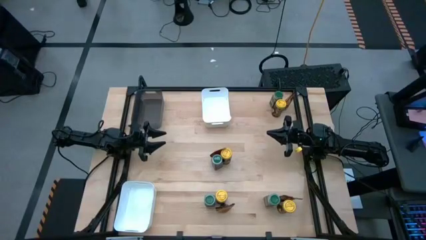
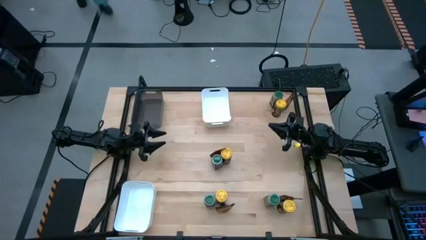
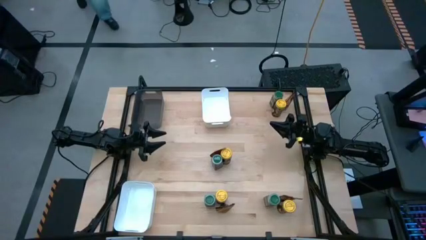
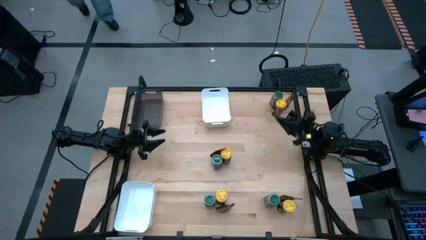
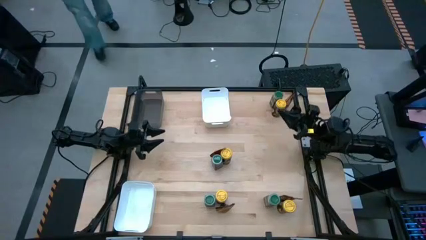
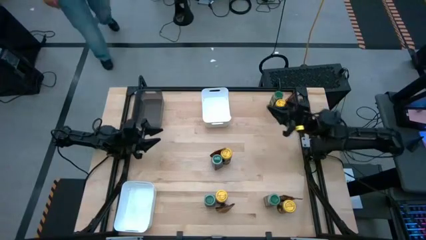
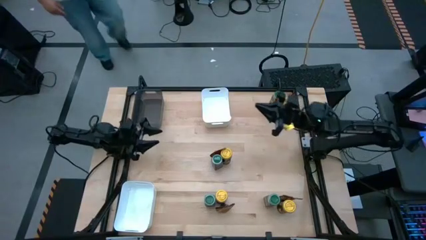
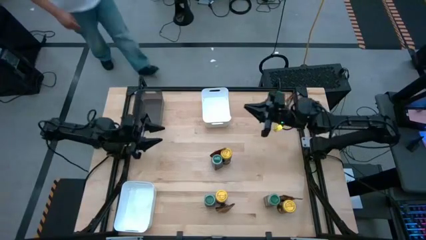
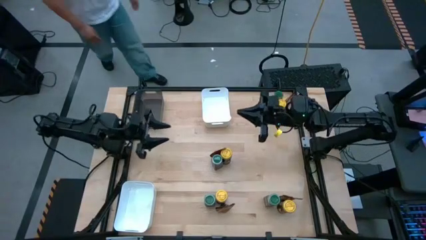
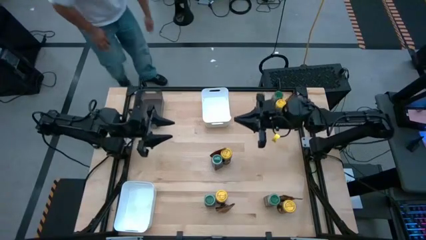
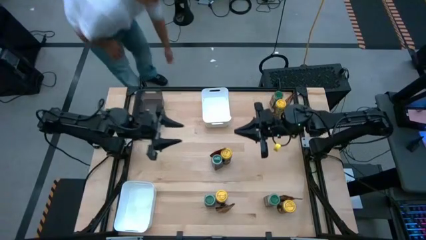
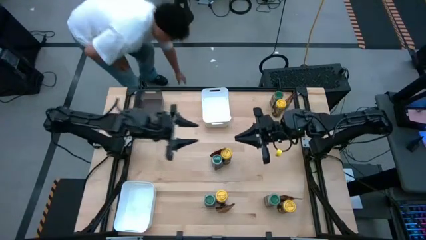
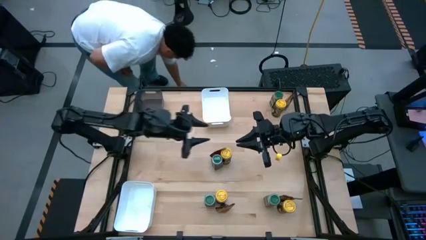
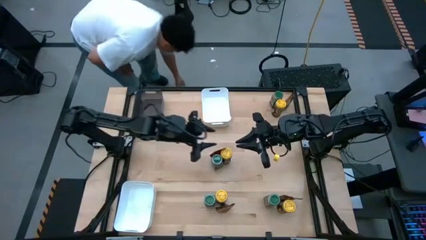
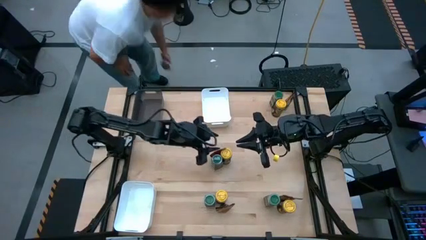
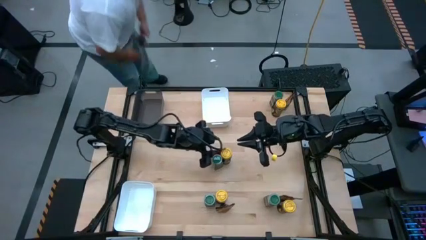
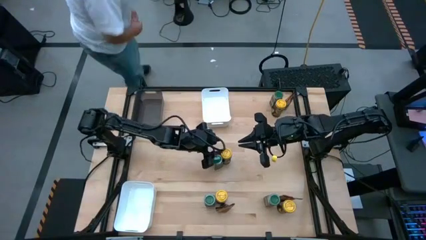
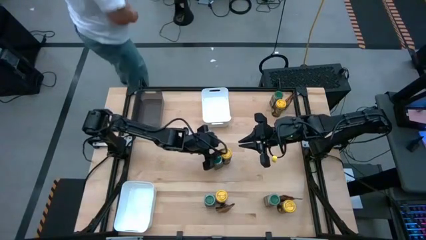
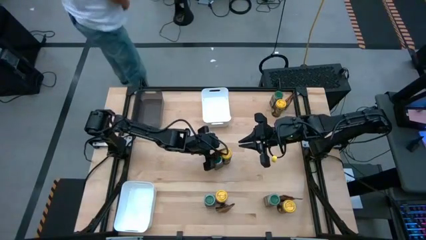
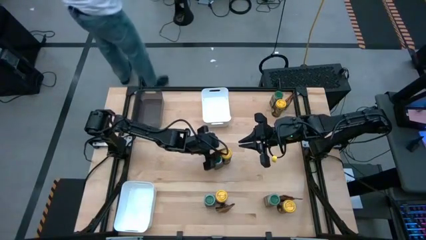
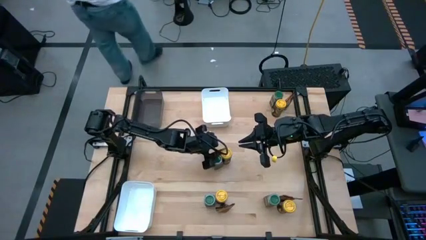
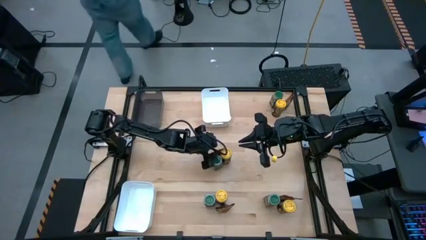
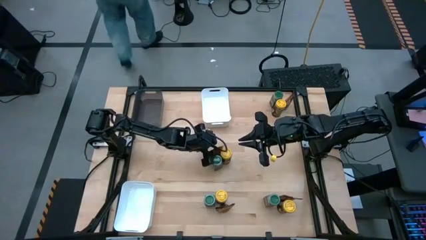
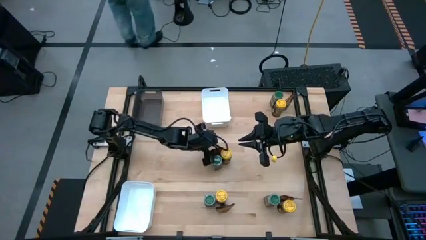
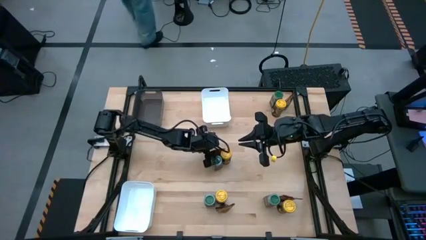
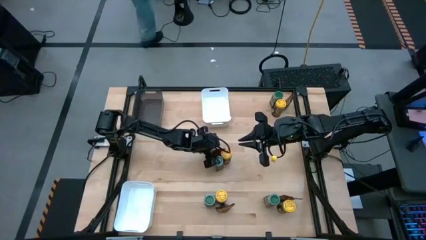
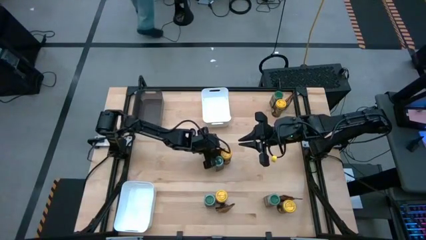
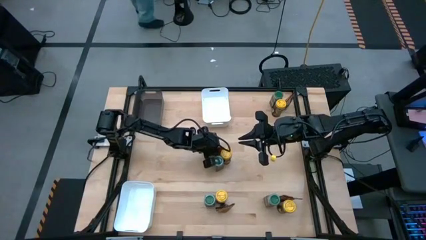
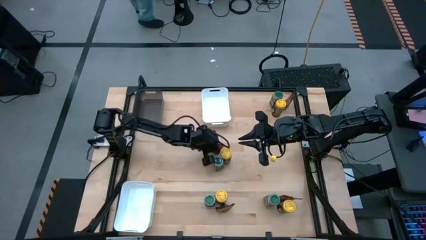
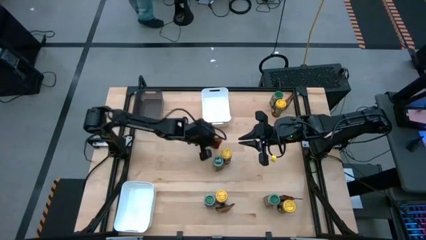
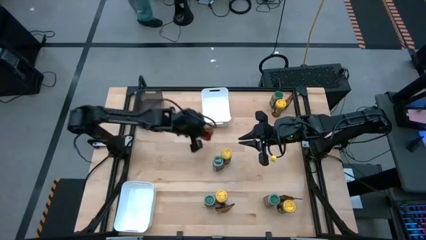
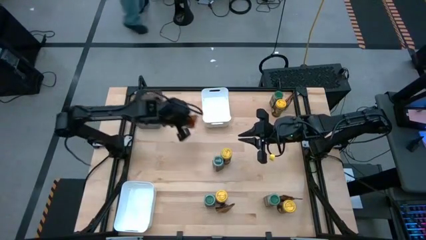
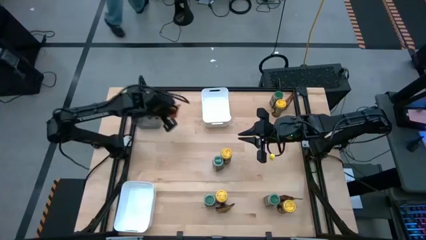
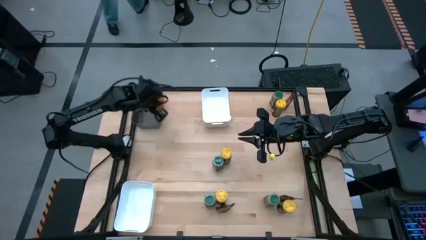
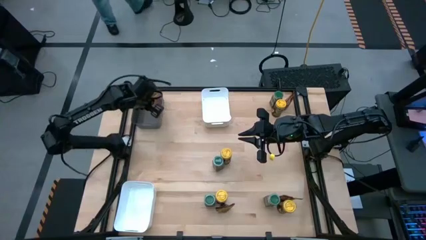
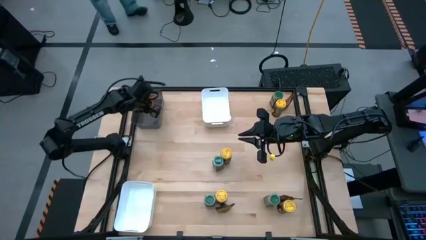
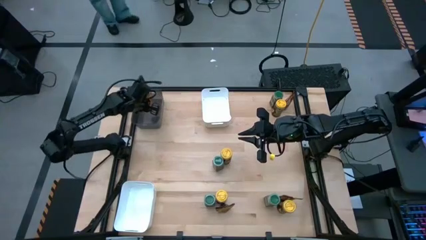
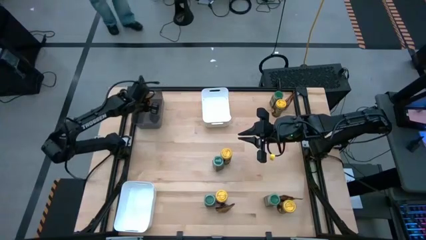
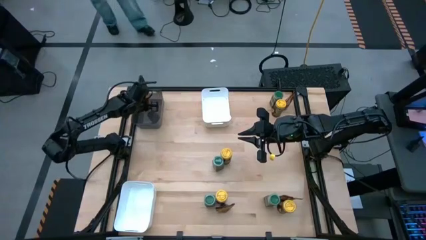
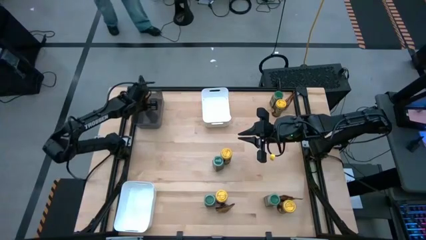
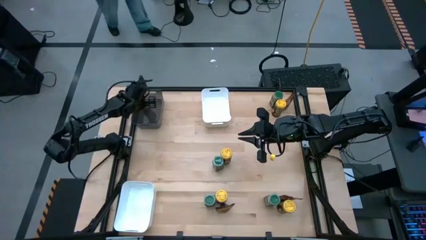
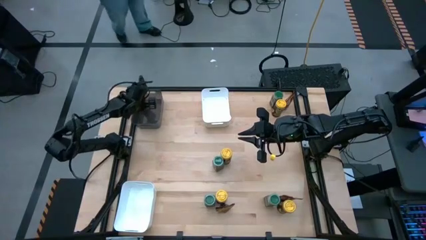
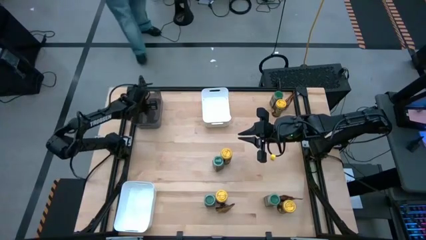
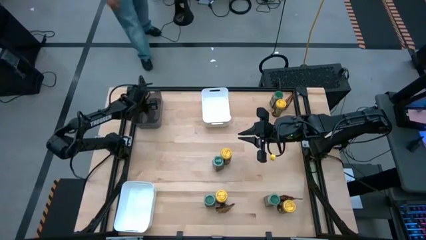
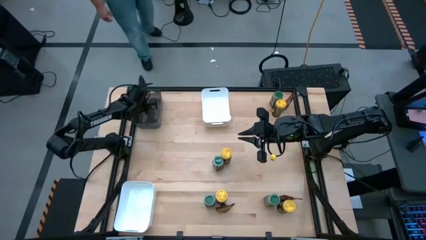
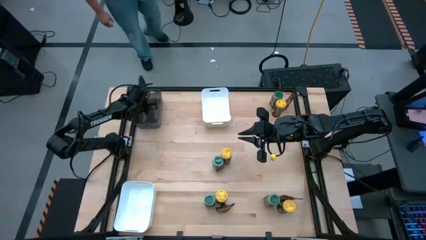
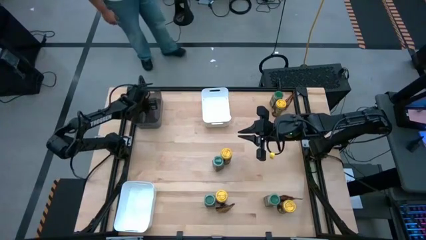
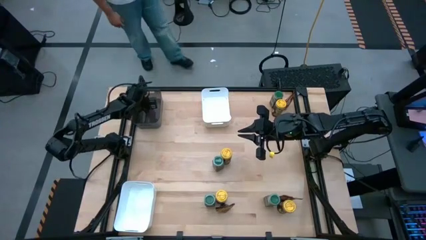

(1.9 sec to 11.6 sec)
Task: Sort spices by type
Put the middle orange seasoning pack into the black bin

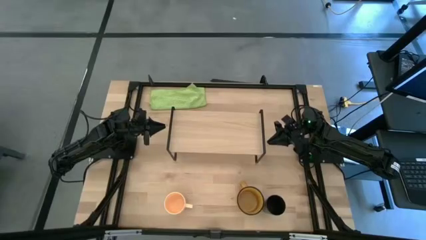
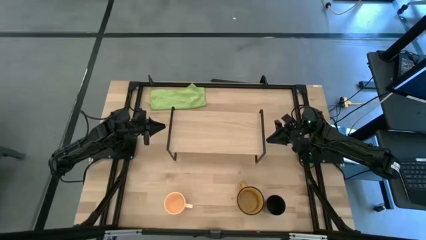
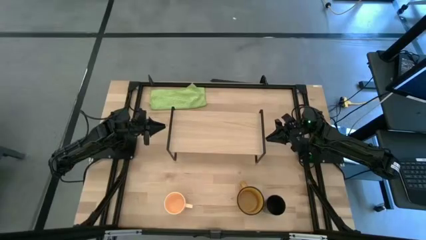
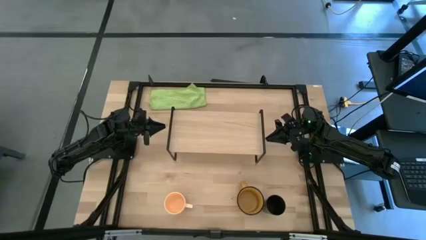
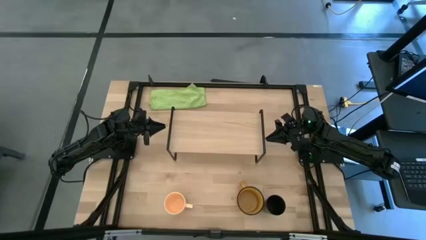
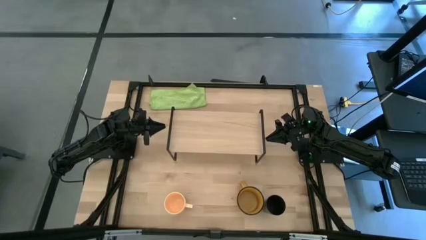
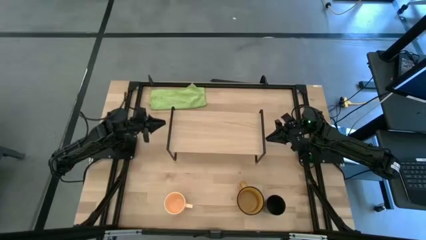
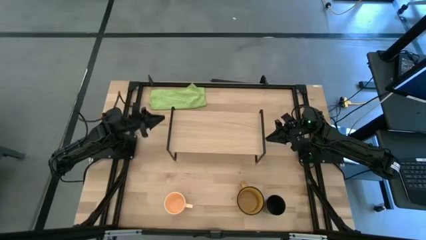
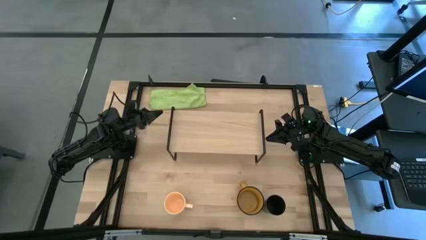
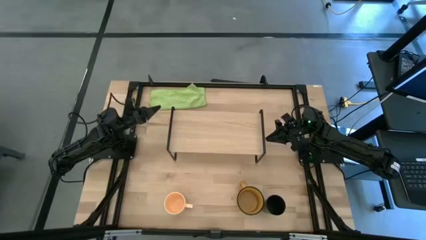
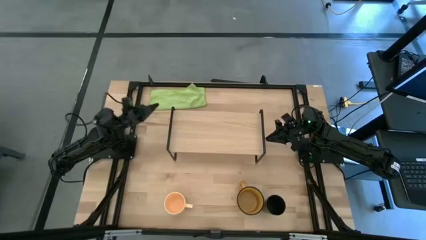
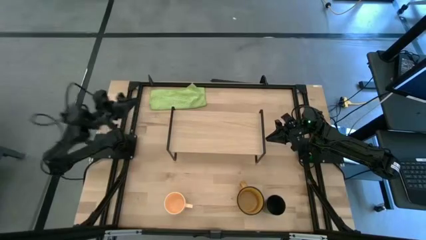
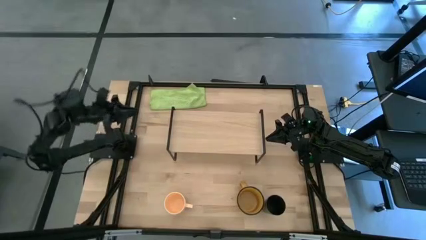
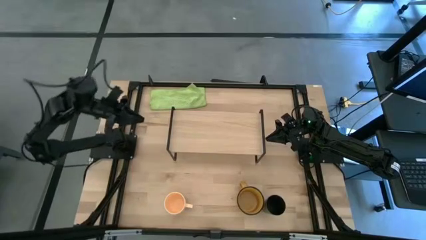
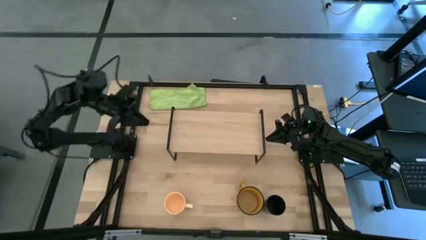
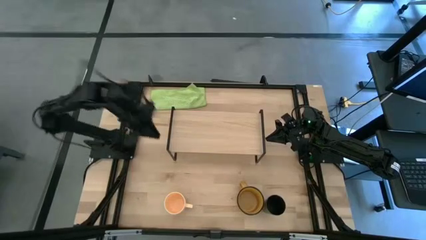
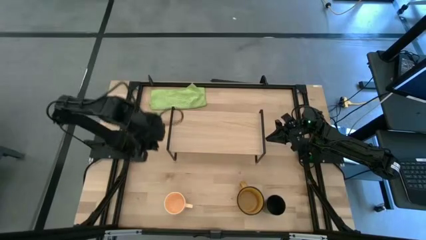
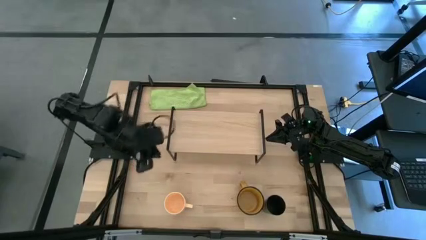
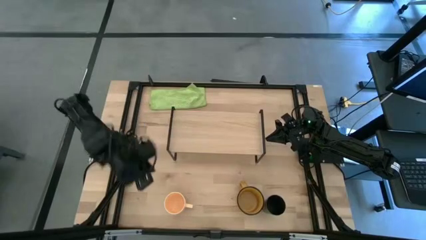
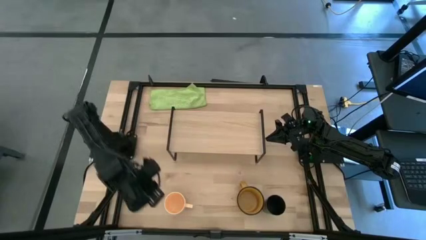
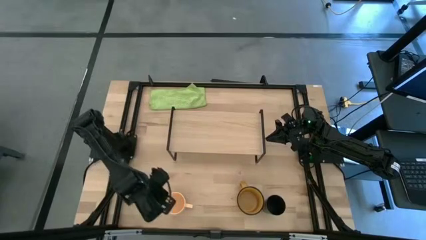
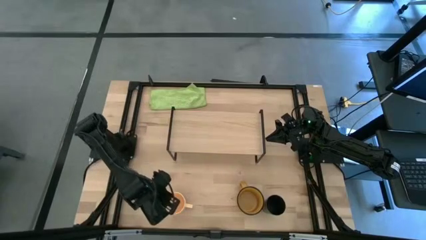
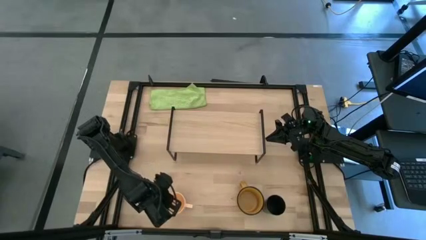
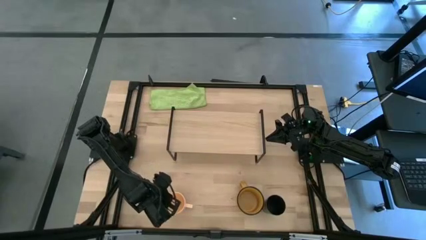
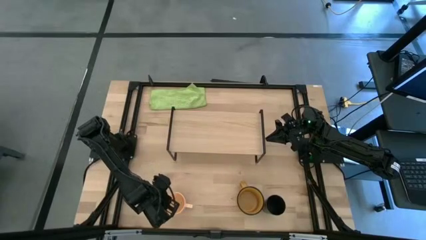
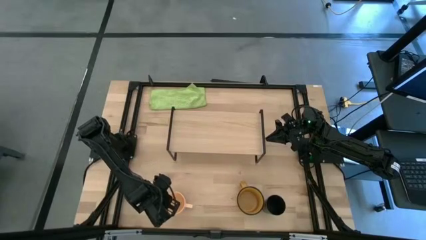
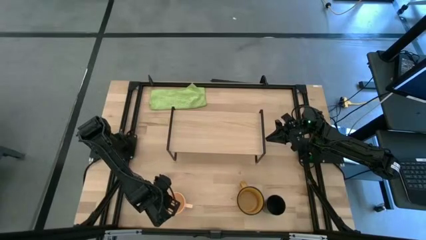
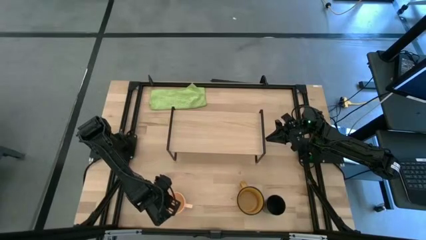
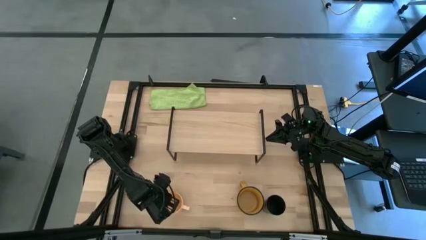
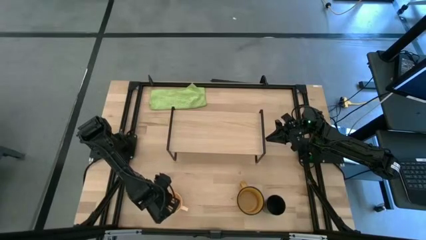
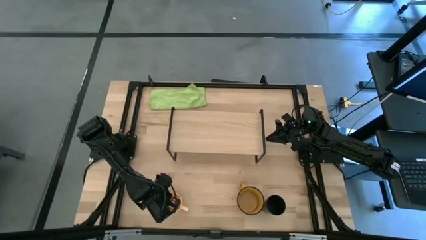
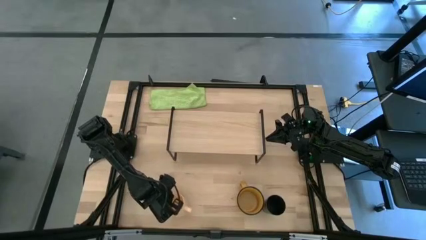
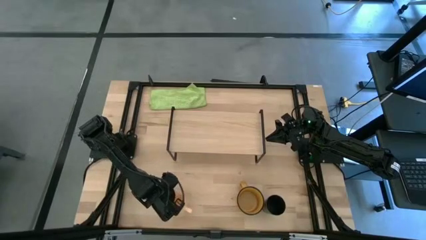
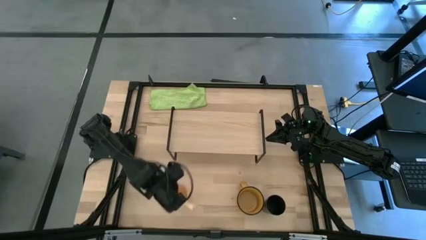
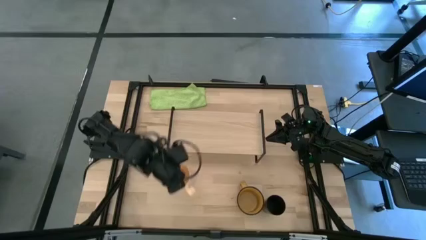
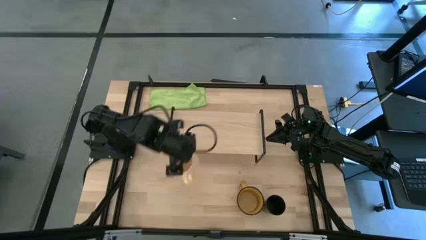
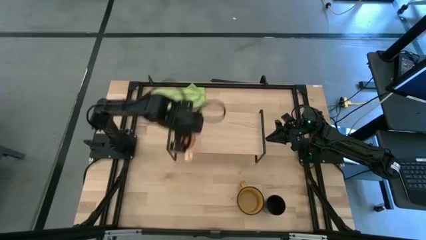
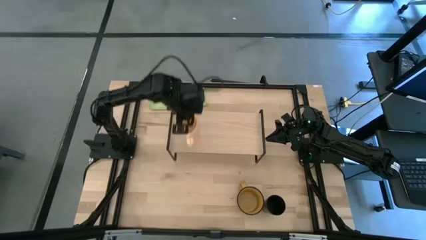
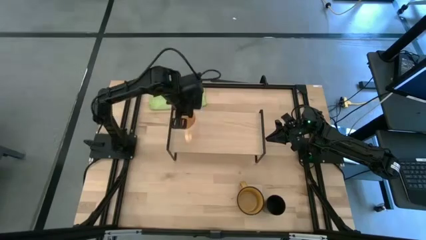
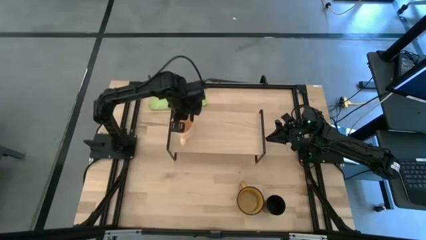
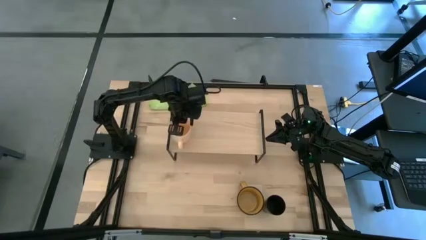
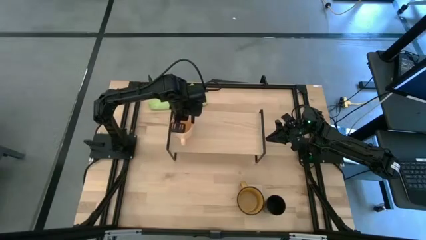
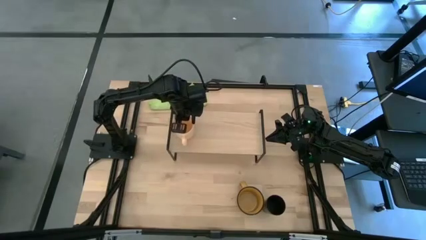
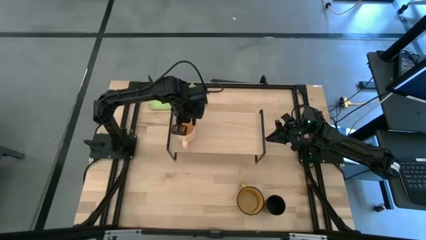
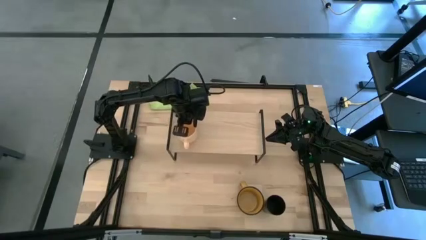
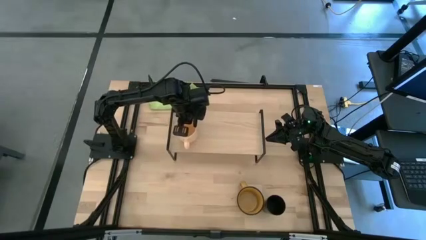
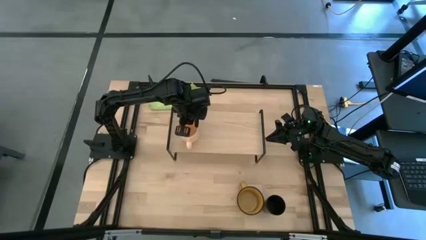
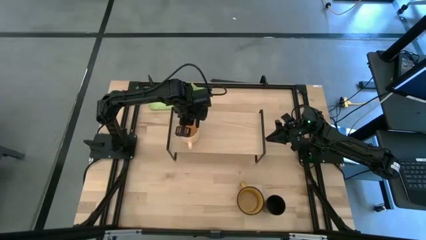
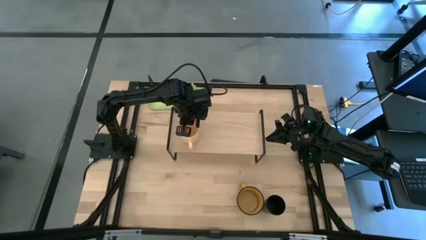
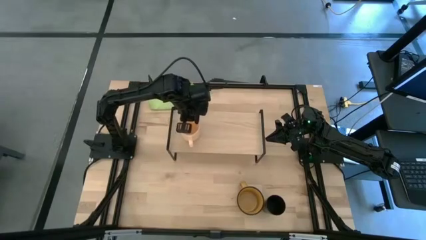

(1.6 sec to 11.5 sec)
Task: Stack small to large cups/mugs on shelf
Put the light yellow mug on the shelf
